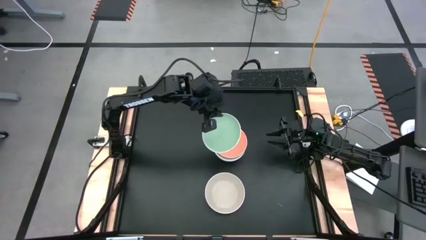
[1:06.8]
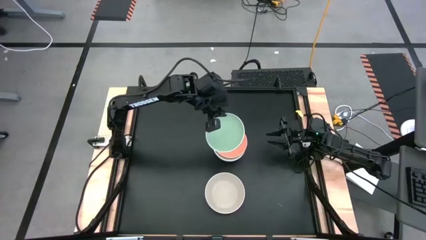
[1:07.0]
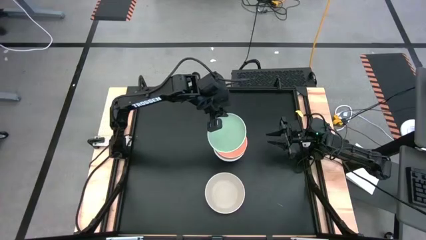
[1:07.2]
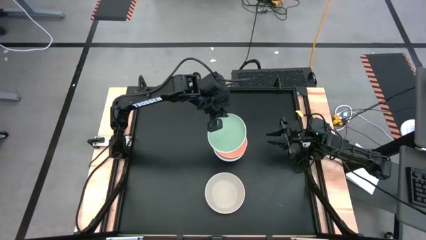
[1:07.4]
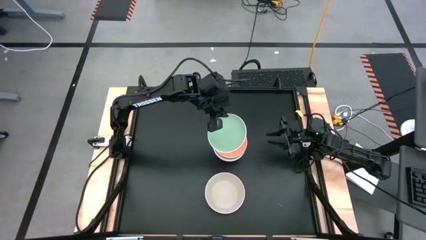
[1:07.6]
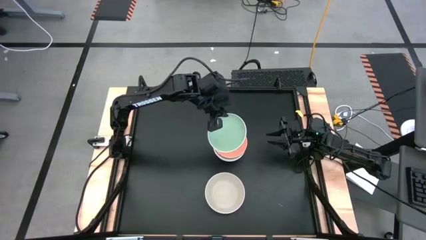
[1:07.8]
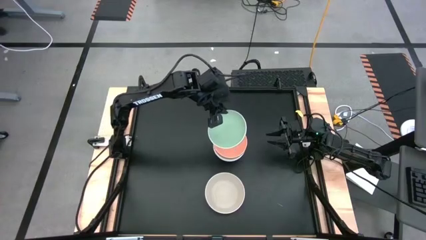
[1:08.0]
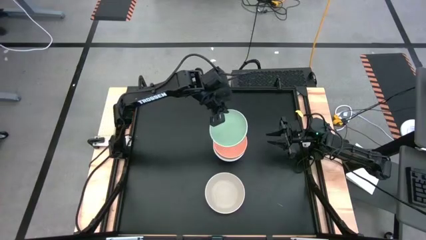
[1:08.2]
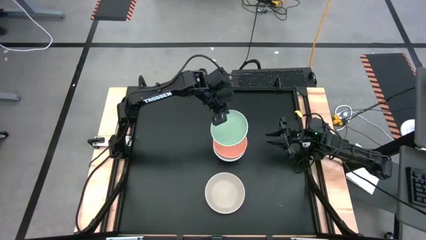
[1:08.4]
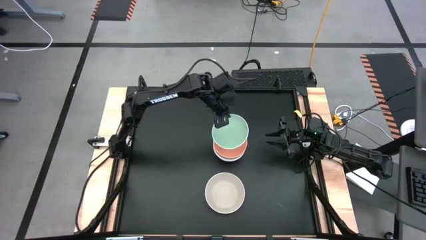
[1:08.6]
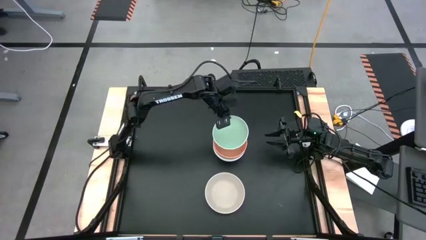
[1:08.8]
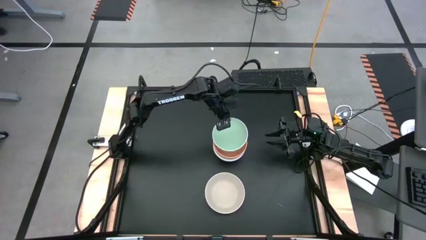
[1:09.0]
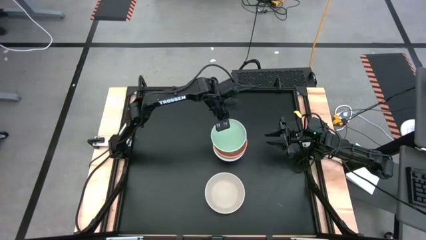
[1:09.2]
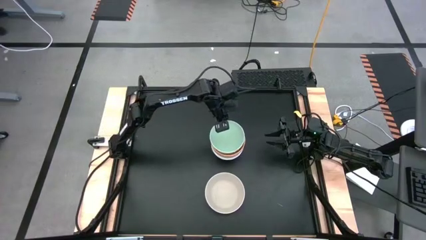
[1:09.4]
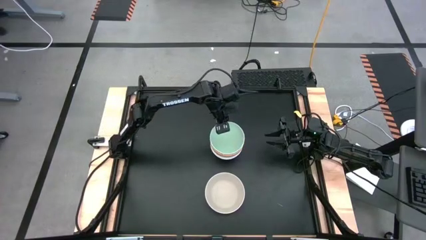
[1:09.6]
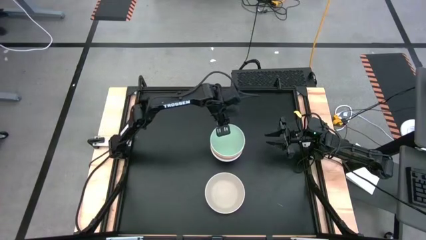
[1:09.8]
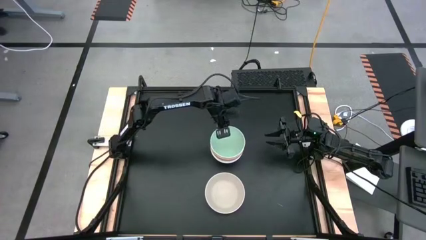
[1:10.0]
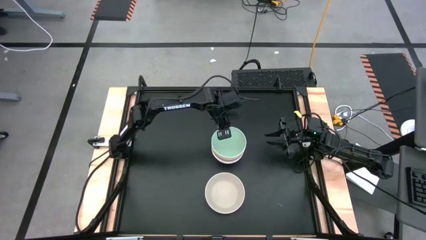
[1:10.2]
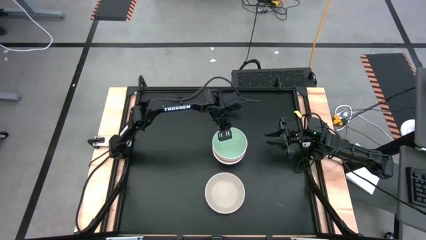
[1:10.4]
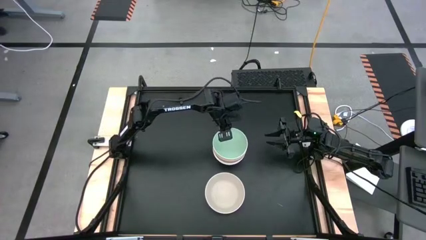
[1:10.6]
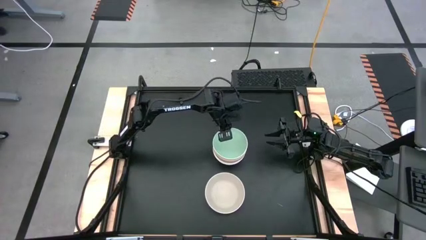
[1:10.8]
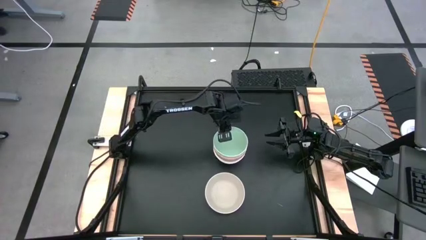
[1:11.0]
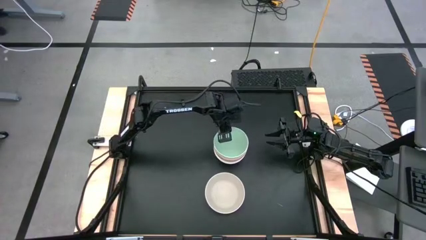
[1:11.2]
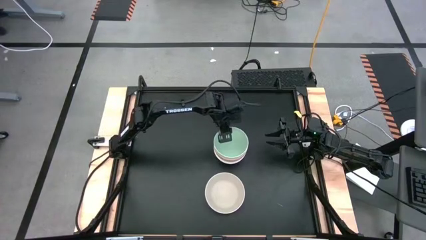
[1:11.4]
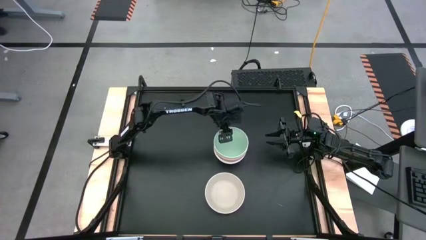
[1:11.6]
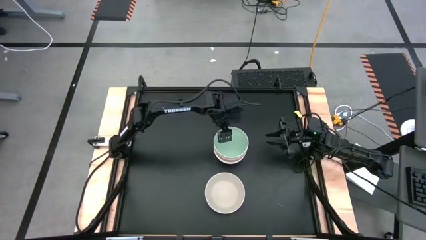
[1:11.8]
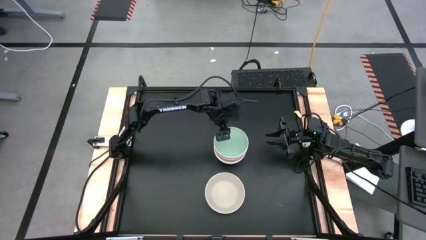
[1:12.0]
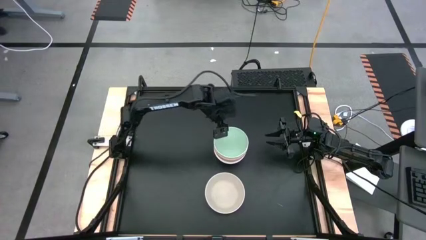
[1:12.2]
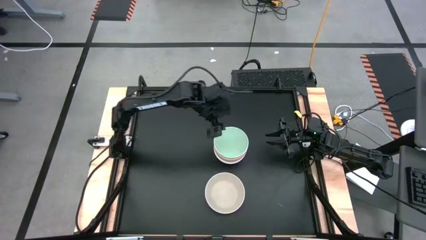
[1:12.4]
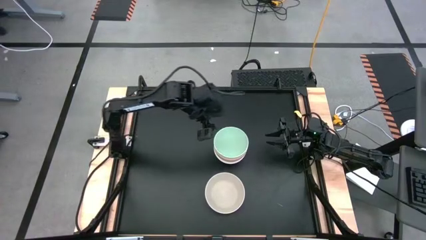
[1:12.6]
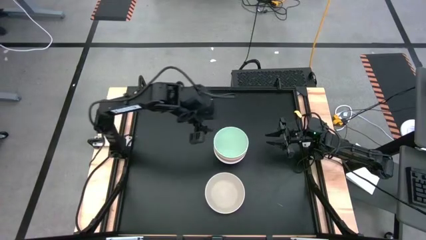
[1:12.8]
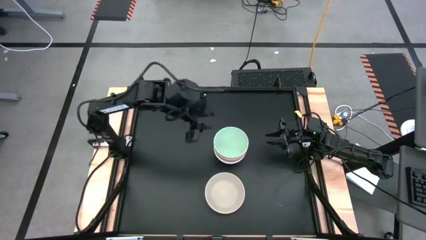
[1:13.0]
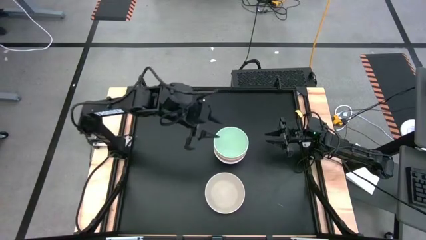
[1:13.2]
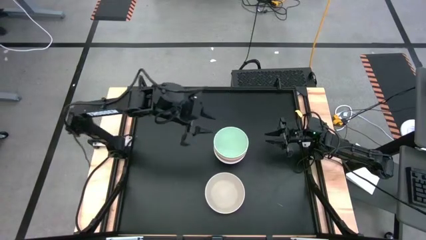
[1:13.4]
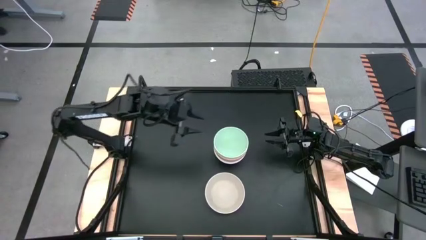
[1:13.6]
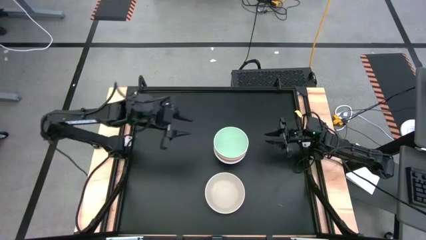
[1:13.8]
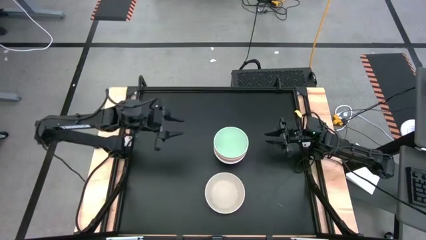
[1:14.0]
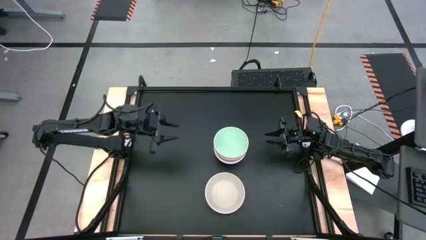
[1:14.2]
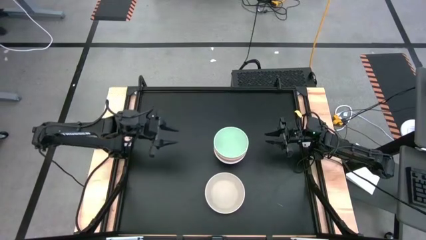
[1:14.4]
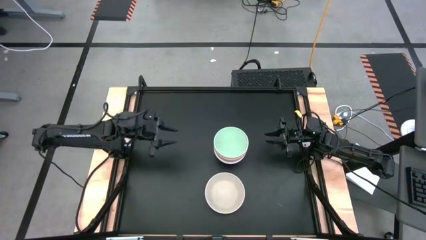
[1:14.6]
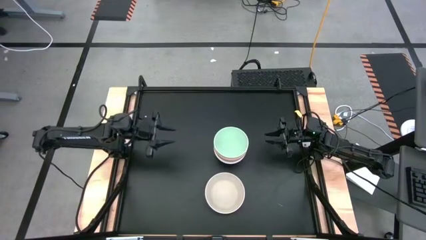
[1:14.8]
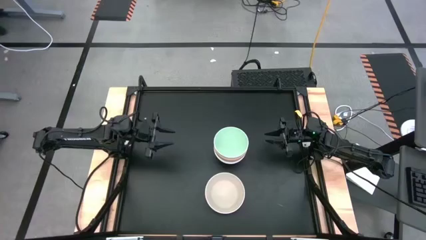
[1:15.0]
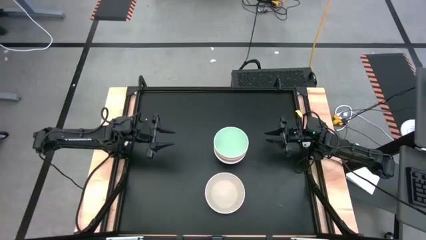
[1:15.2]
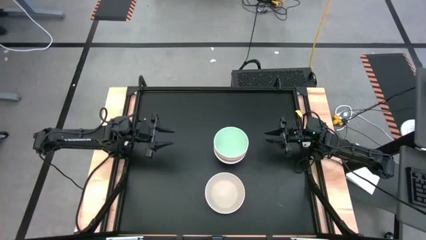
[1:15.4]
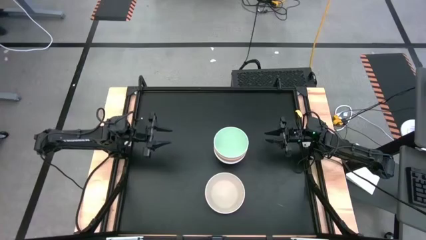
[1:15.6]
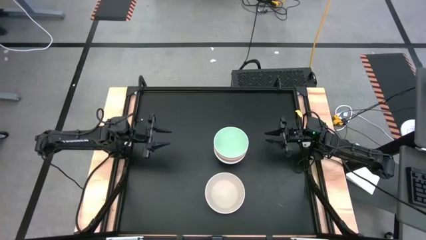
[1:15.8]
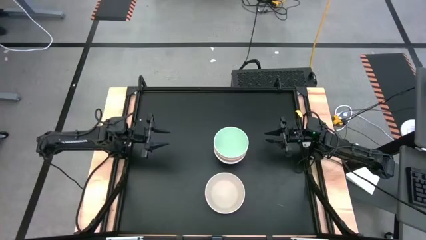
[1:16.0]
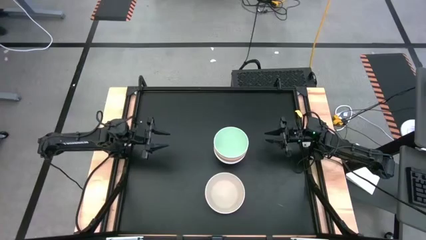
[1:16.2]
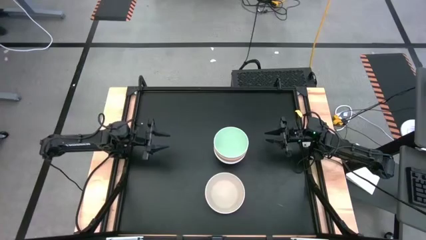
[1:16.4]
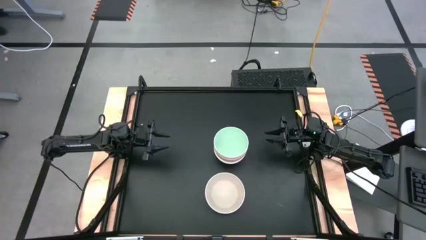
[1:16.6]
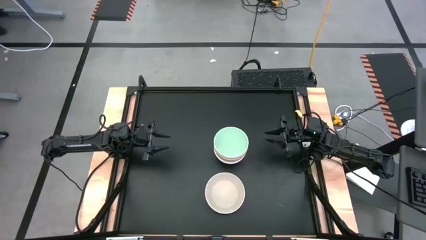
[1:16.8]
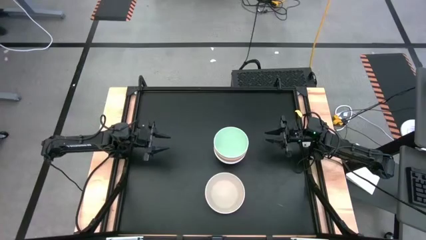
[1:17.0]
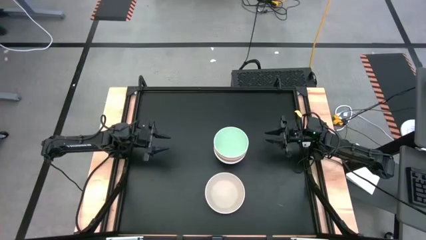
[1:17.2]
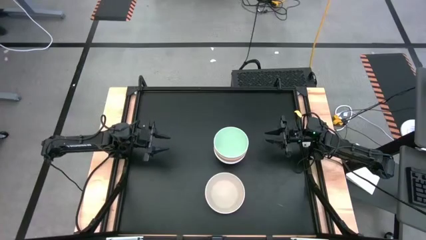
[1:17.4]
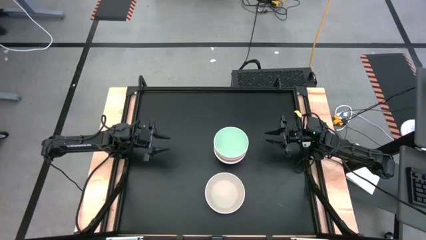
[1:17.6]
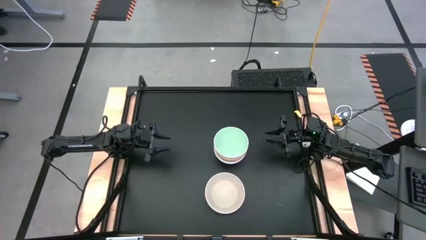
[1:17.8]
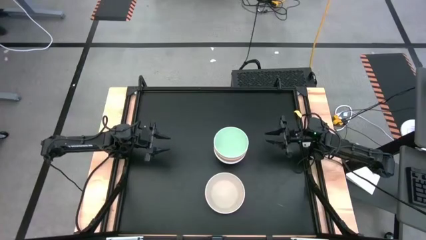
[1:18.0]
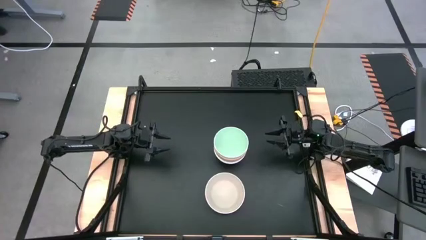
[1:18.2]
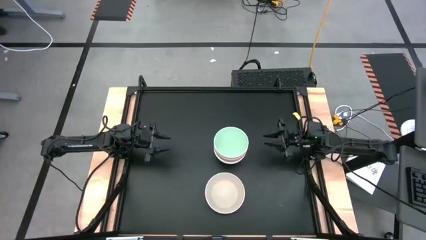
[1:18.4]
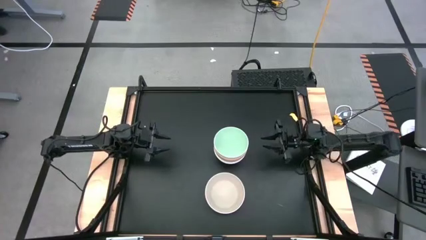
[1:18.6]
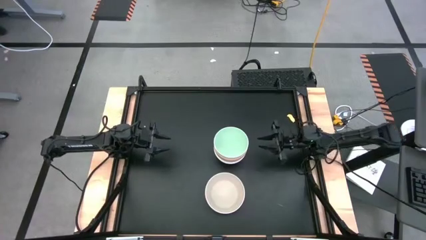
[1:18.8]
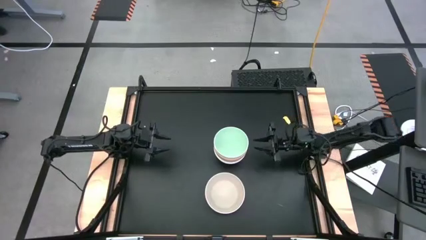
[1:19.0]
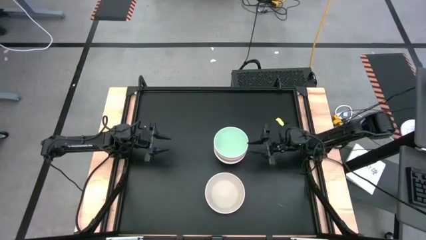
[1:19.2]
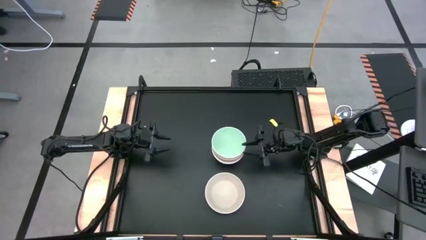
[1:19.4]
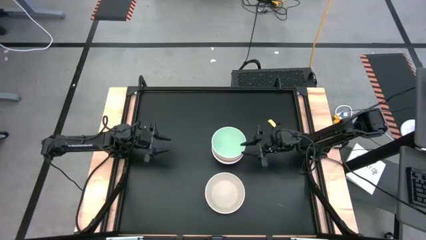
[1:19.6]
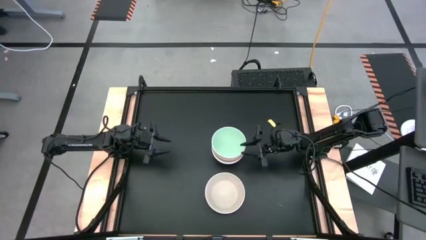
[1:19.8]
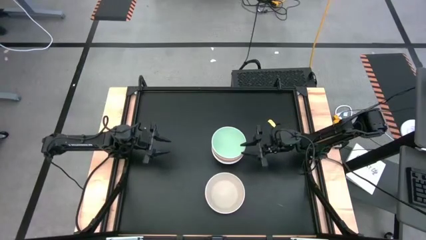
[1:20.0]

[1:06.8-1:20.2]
Task: Nest bowls inside each other
Stack the blue bowl on the stacked orange bowl

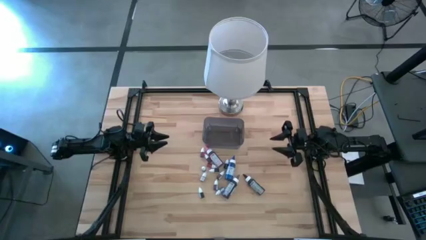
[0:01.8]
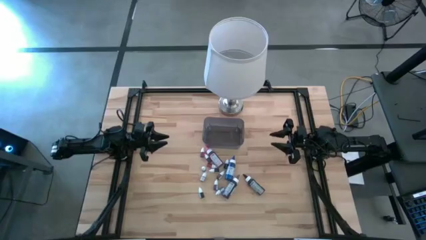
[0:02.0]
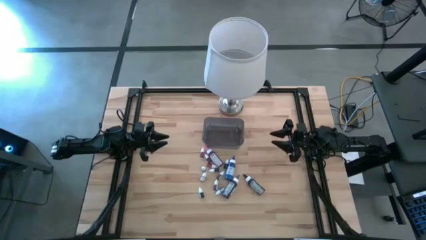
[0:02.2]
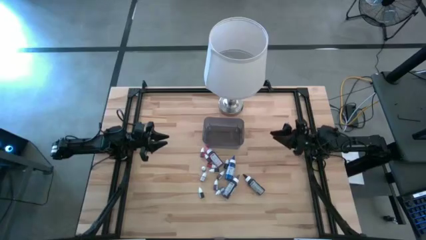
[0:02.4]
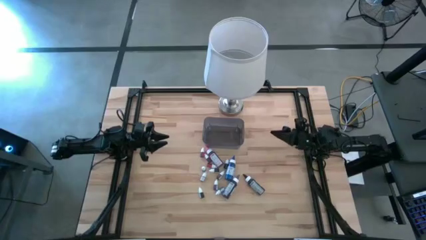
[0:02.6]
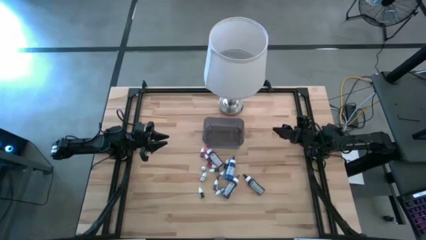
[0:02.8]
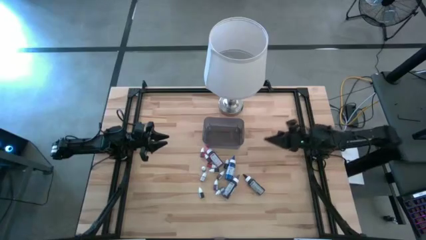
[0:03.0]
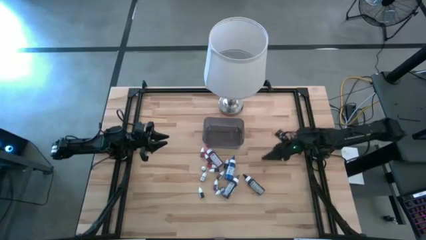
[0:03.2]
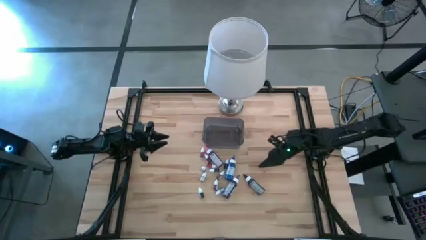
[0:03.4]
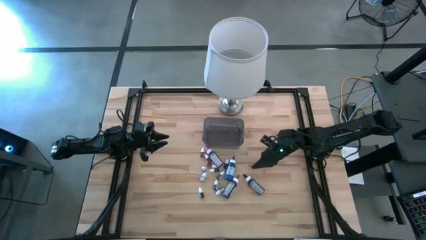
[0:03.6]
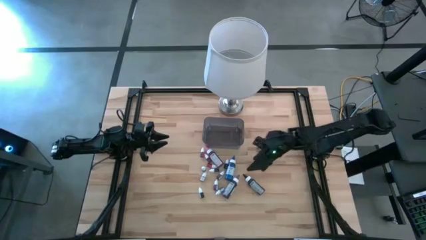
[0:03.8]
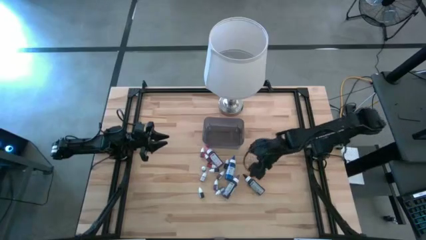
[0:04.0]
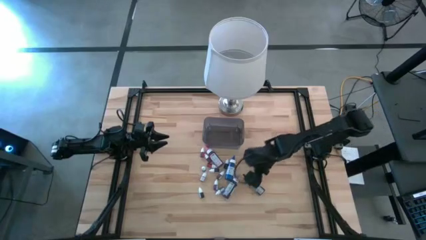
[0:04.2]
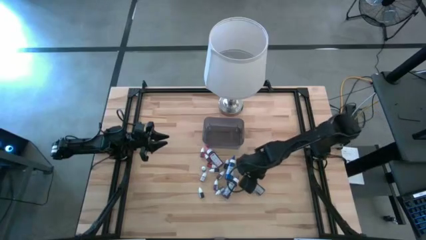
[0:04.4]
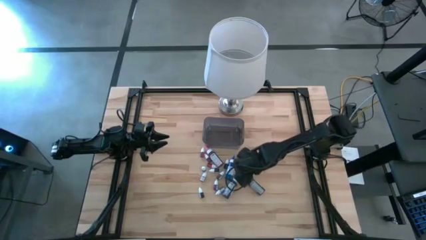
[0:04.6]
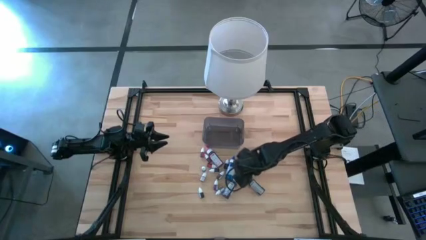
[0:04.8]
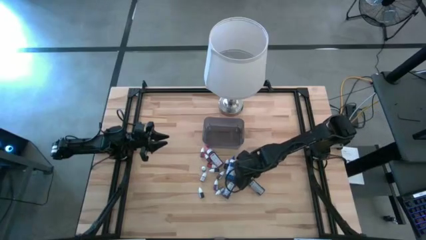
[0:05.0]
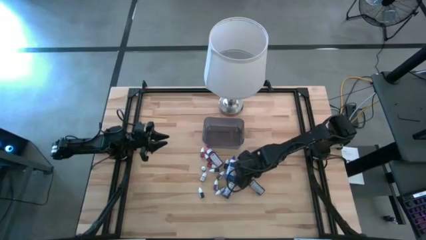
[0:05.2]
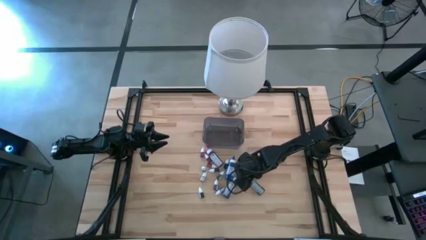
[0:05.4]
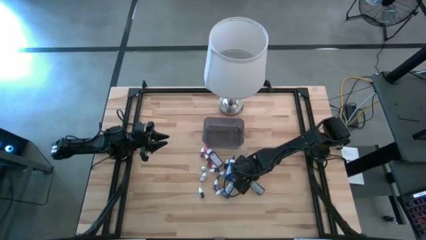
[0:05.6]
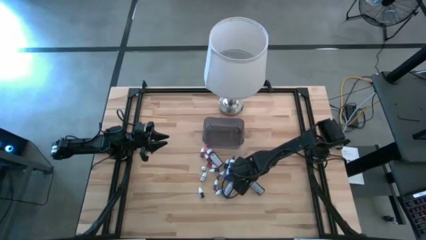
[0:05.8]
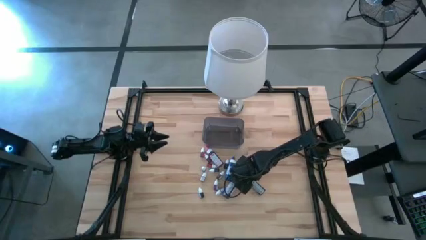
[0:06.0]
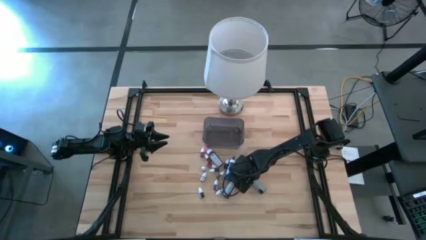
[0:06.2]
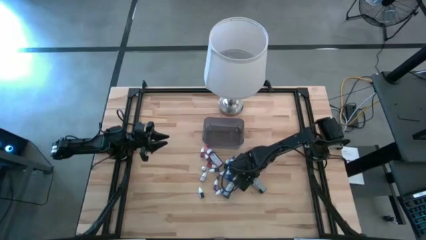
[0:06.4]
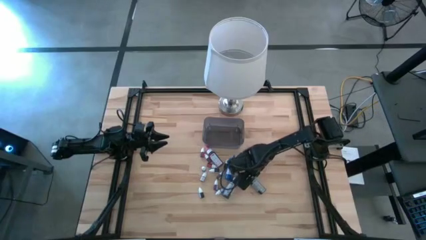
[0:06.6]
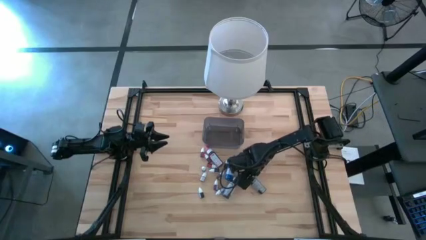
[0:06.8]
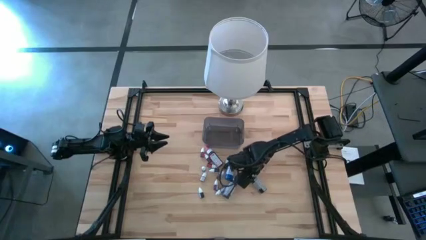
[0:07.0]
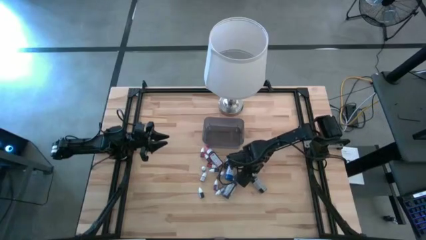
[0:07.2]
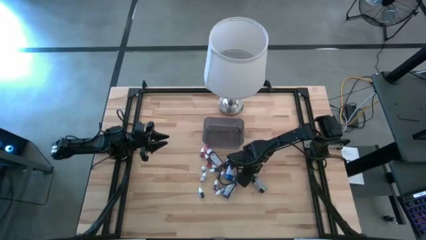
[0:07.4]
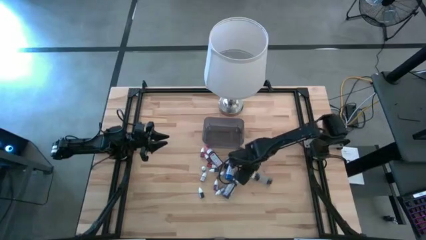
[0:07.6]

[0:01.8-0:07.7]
Task: Pick & Place food coloring
Put the big black food coloring bottle into the black bin
